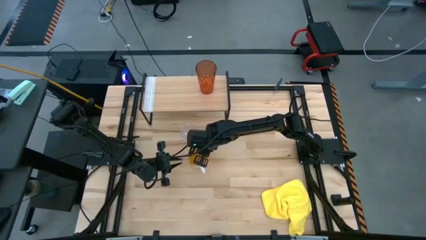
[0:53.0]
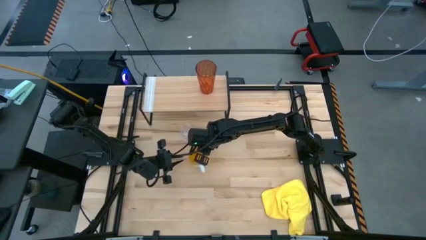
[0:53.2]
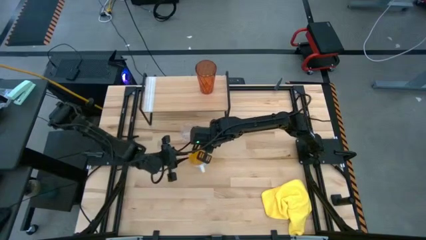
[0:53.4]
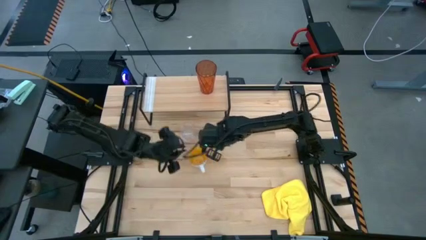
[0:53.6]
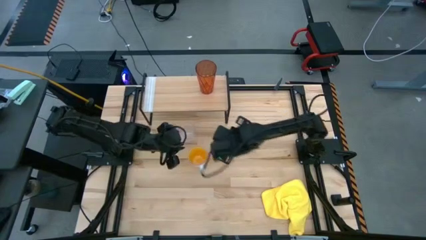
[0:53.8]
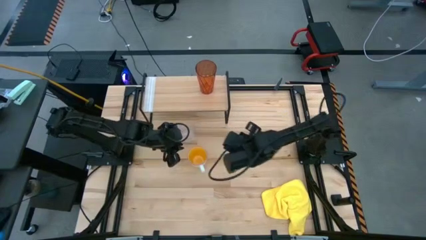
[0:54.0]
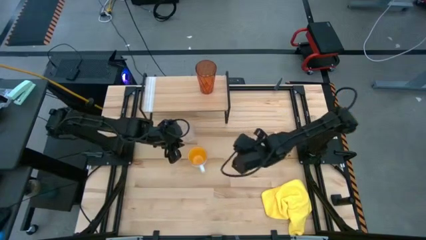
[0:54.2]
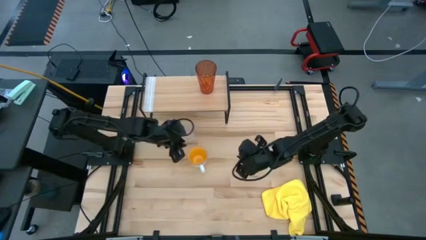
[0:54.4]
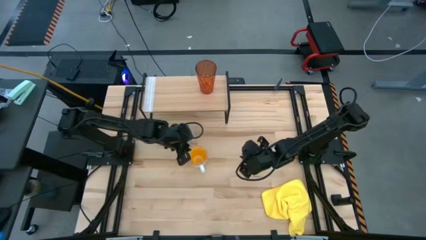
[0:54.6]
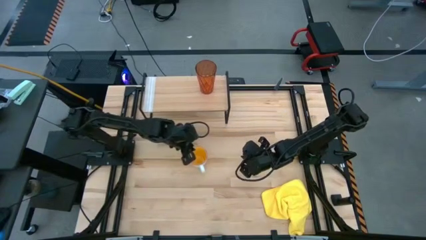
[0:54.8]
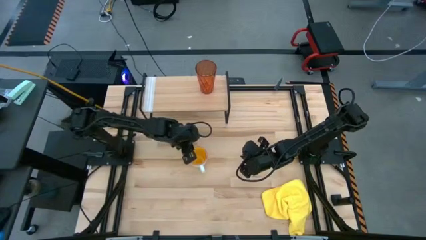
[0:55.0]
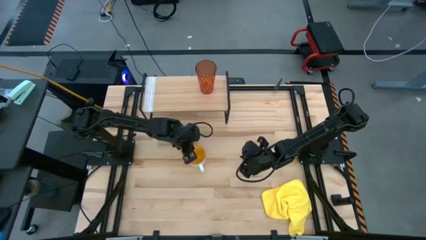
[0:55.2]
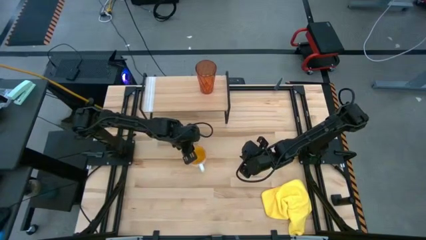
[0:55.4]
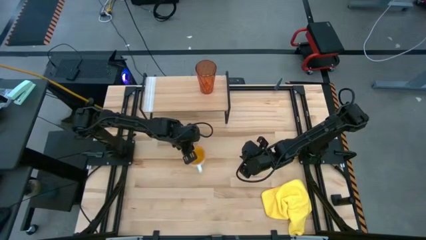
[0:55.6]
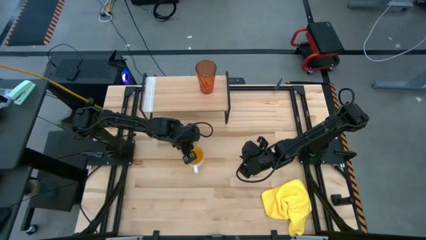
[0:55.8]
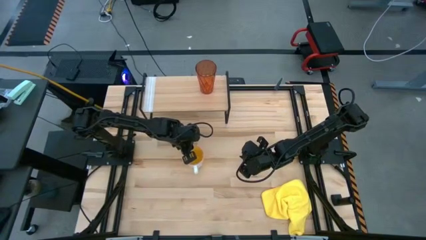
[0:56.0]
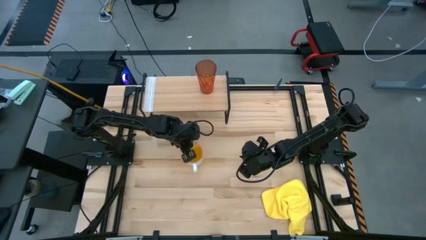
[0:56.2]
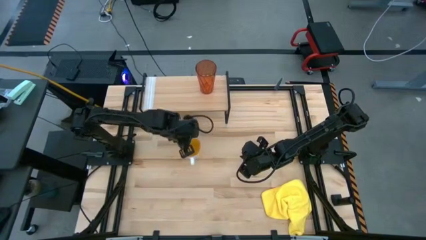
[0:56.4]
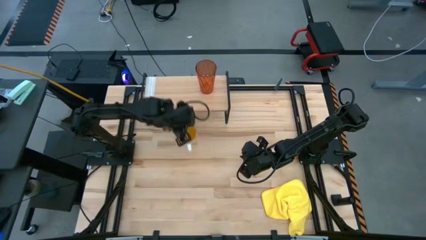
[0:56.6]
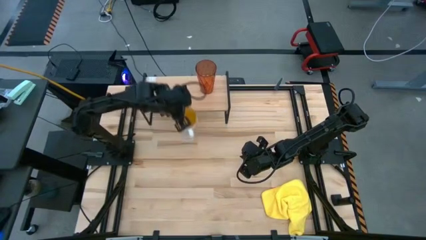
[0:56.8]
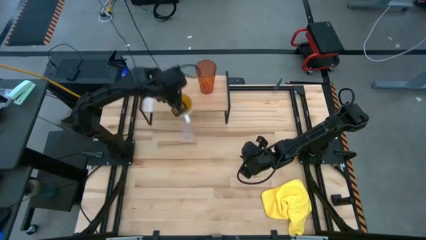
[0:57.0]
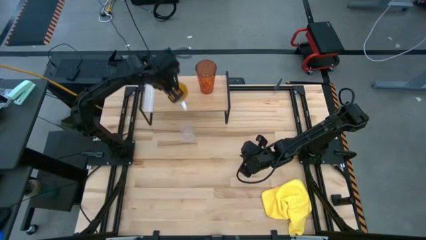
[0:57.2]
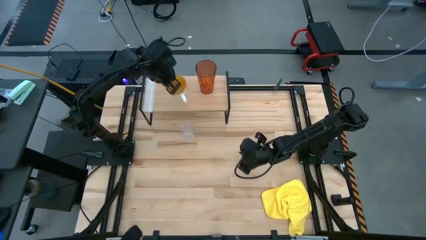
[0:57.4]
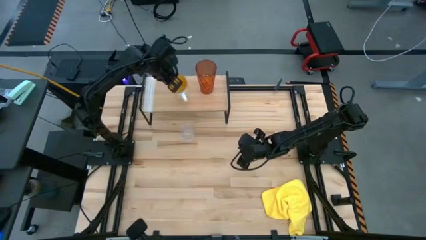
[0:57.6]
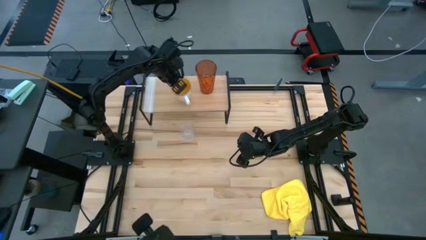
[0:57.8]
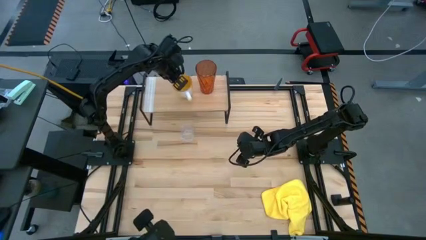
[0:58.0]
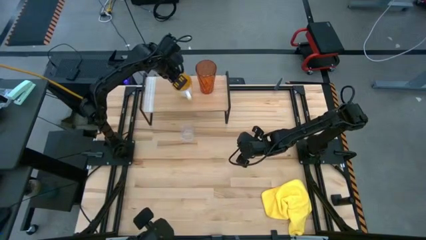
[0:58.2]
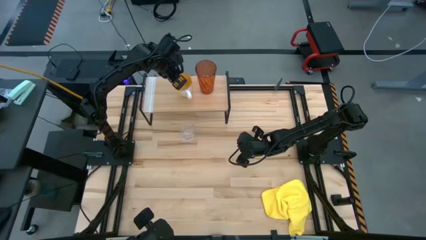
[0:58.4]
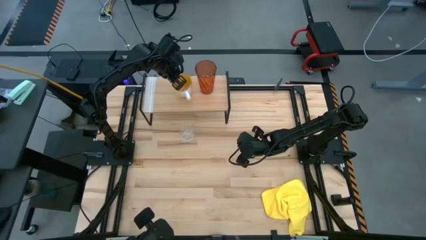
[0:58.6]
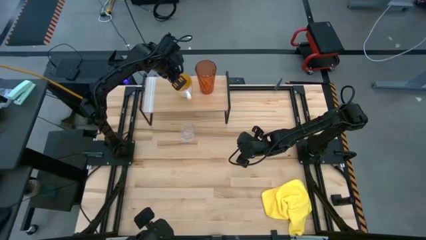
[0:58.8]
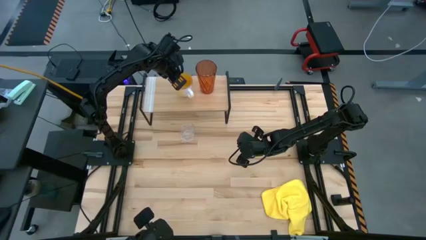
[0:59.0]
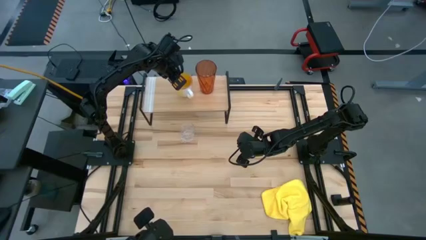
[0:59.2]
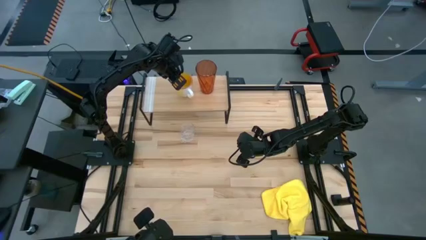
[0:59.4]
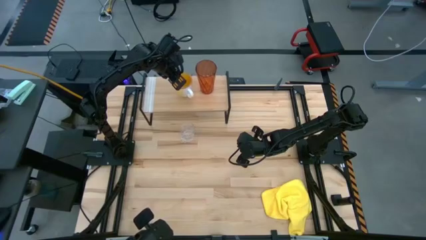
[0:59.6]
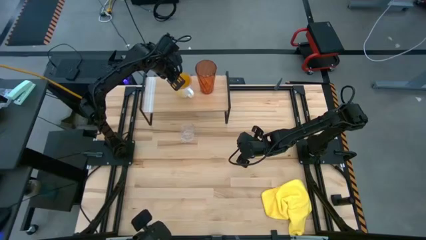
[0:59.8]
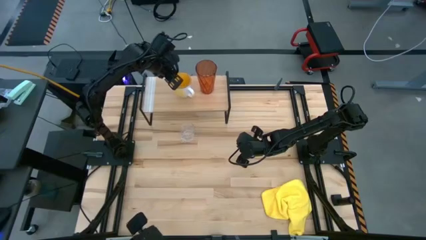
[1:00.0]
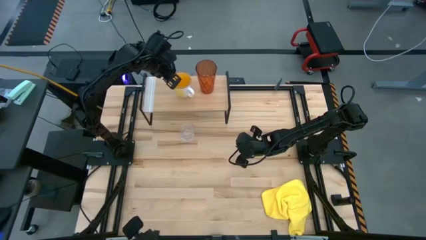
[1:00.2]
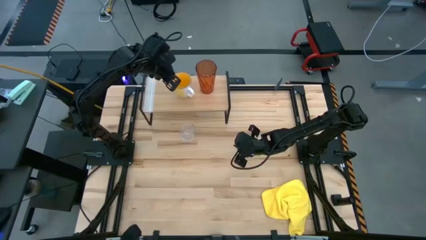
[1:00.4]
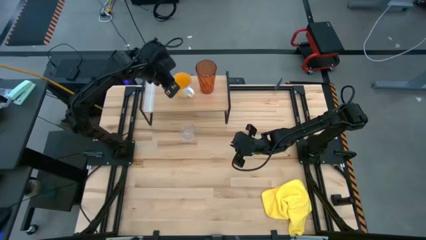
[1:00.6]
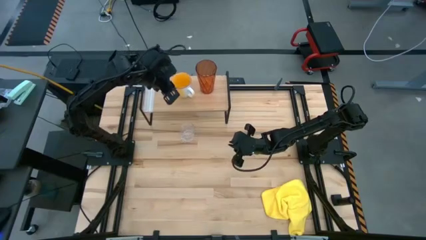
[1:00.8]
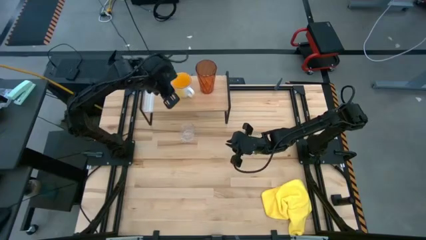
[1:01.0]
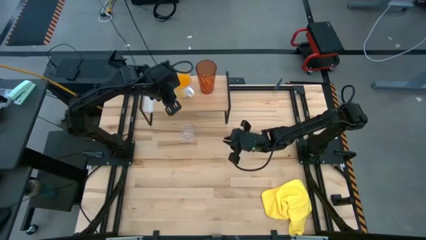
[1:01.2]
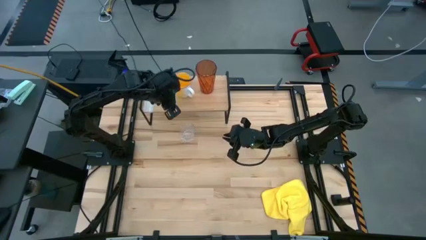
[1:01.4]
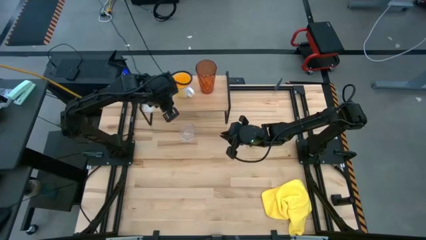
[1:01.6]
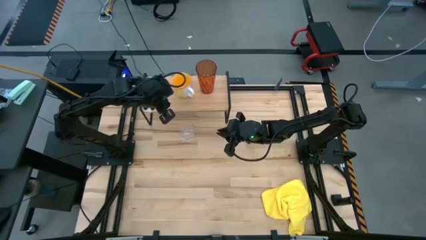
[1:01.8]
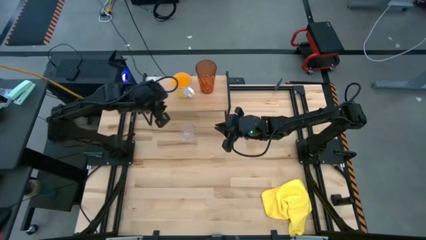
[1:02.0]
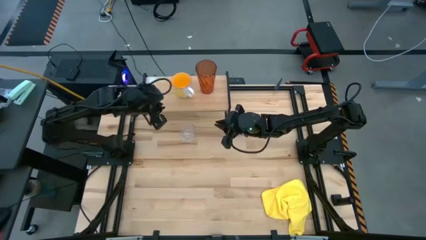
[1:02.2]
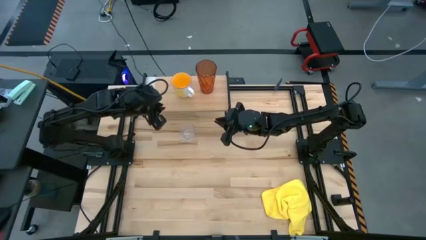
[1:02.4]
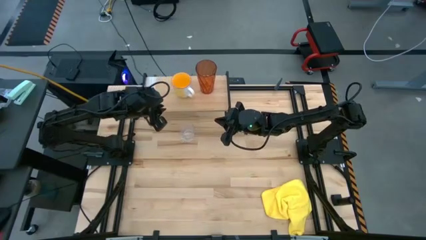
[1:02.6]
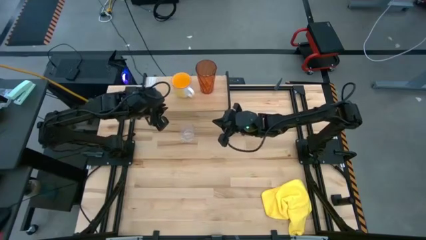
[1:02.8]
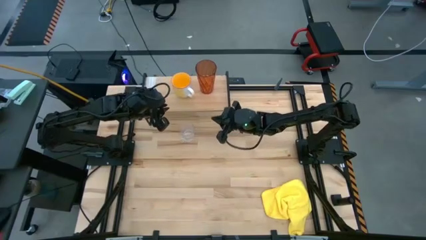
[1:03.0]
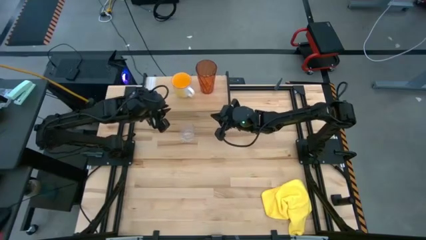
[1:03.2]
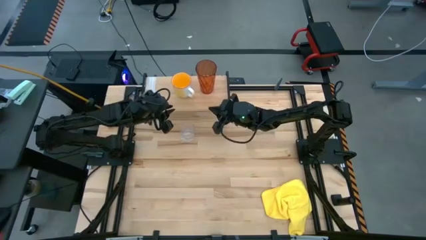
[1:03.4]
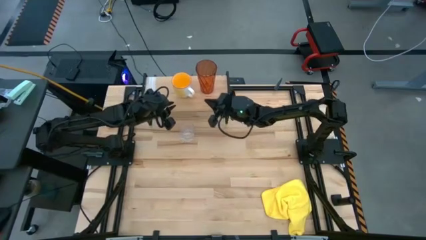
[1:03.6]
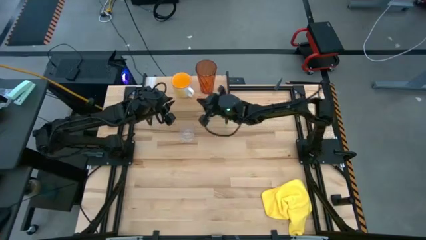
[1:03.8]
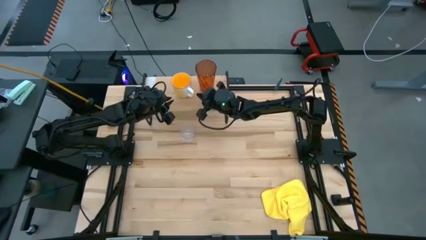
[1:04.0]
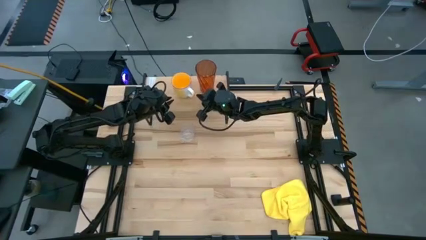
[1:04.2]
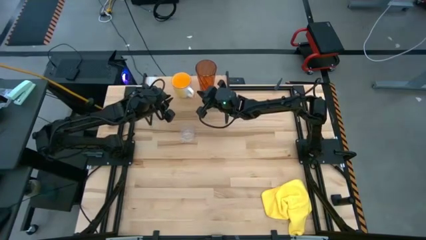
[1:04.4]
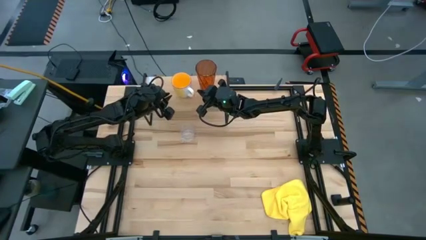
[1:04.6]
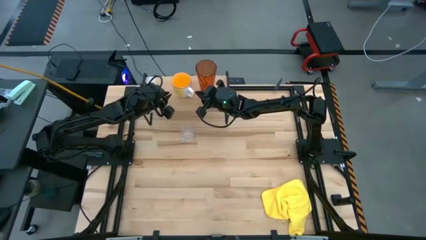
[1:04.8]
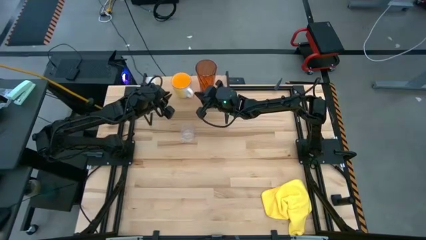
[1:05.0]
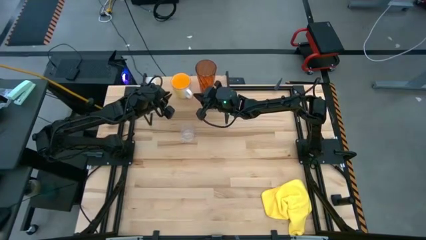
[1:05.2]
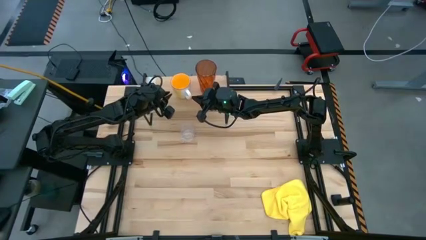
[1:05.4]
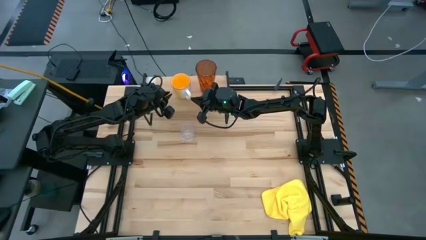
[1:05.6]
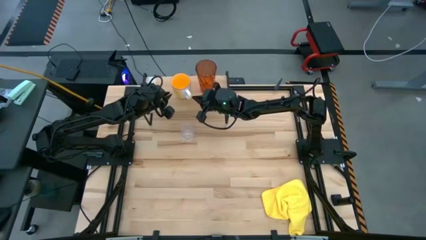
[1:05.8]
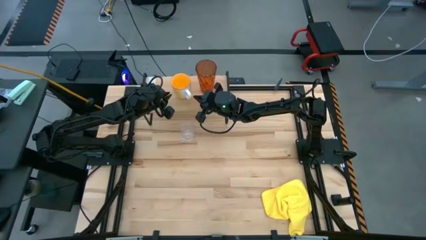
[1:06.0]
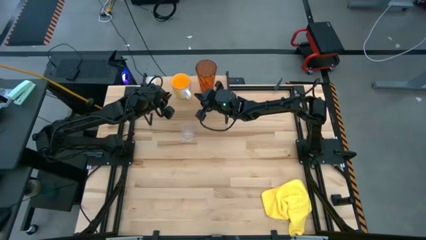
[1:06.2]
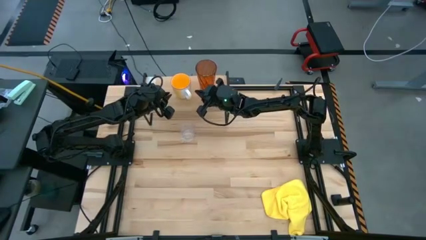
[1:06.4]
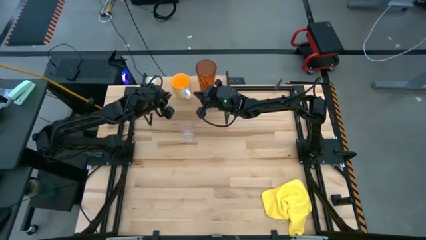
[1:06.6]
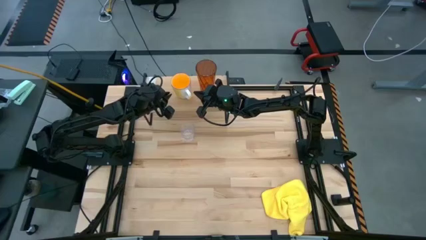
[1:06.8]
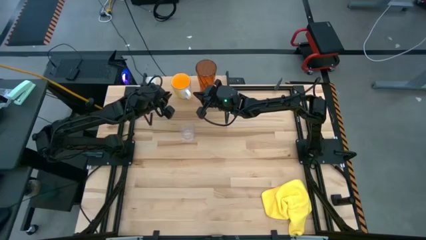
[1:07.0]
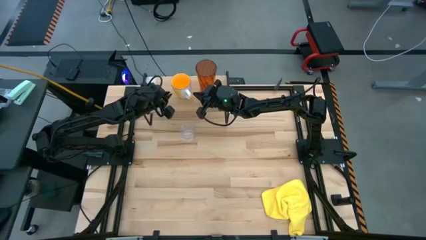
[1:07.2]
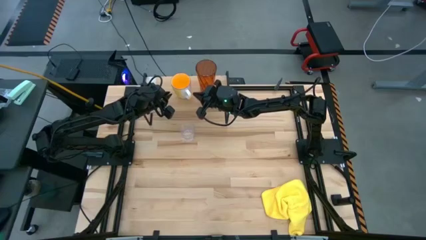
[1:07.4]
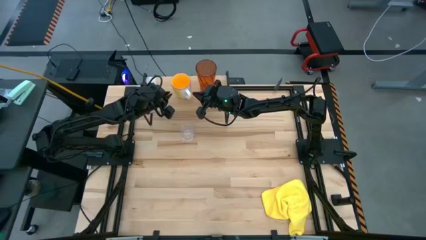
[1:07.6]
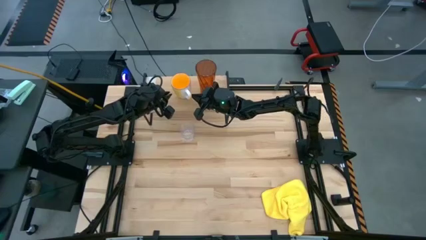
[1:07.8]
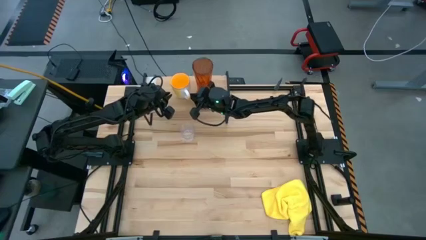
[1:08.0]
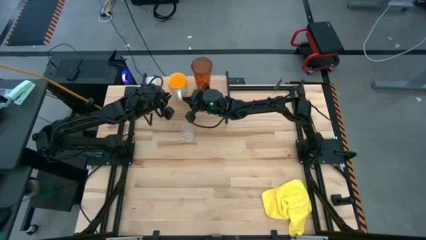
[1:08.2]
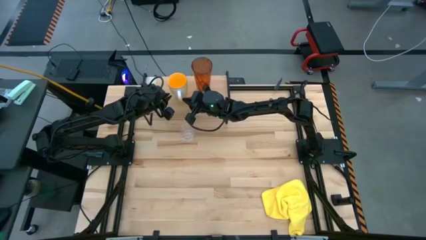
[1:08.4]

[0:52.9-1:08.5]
Task: Stack small to large cups/mugs on shelf
Put the yellow mug on the shelf

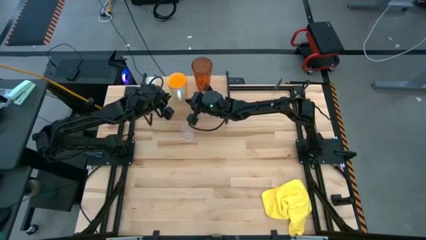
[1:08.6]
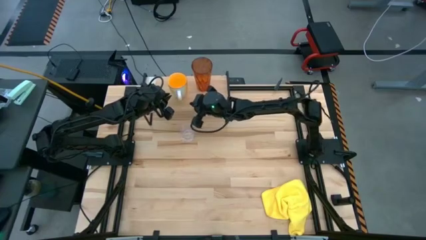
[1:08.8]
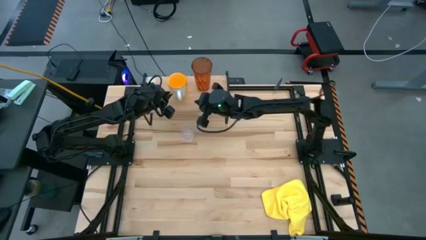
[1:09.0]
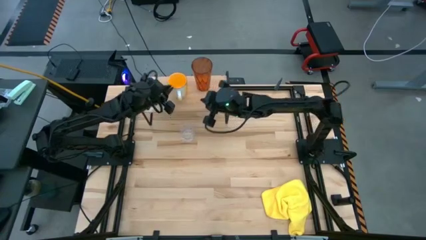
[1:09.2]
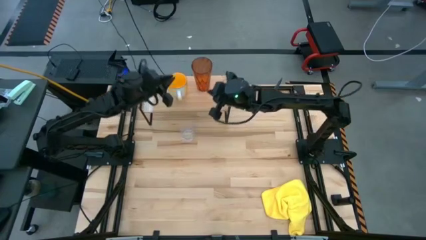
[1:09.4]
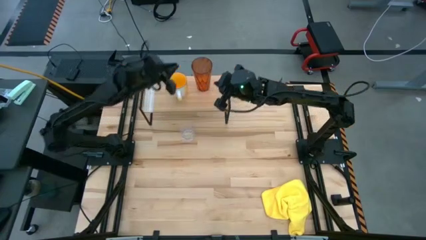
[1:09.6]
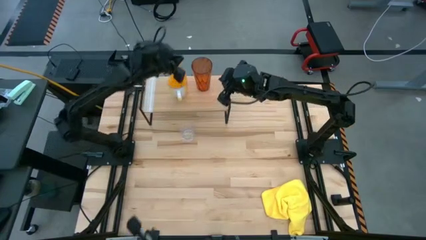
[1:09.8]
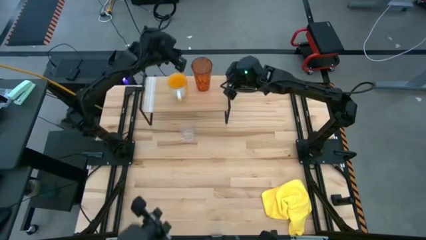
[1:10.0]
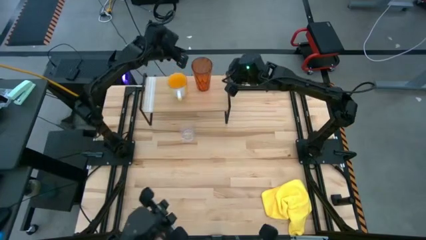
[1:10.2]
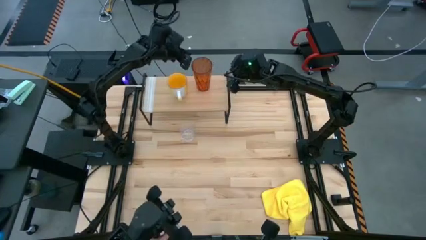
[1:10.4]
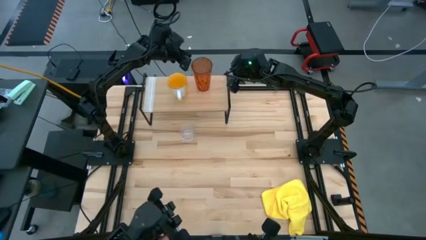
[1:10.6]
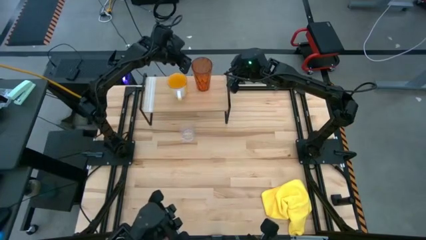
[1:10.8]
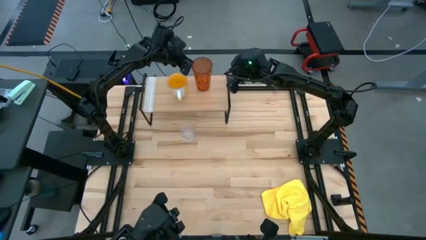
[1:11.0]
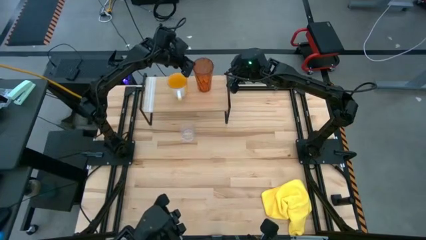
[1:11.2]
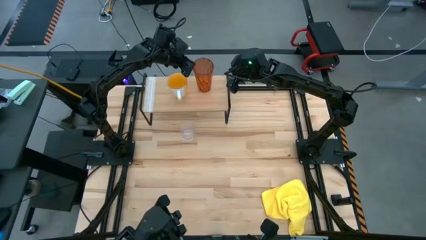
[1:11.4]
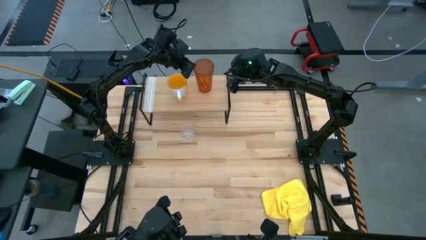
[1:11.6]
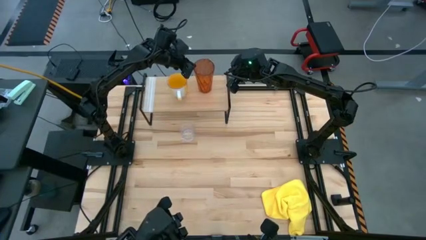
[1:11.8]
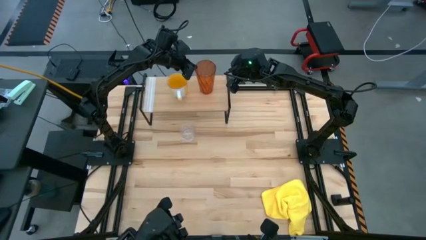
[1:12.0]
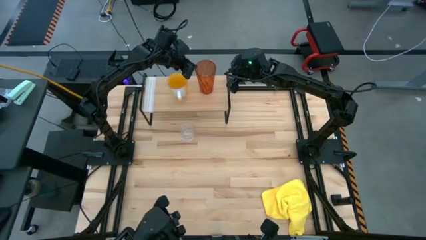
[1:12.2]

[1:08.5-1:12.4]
Adjust the orange glass
